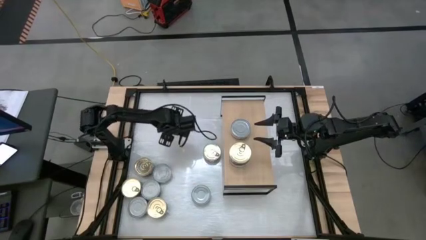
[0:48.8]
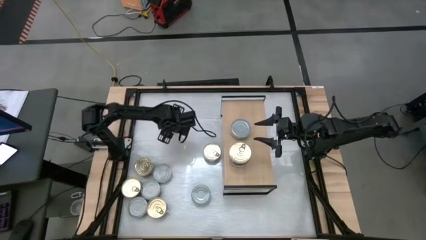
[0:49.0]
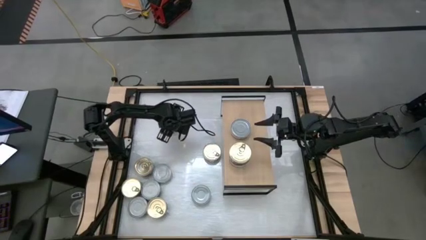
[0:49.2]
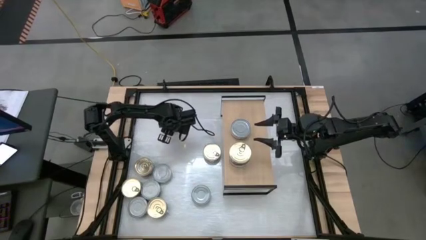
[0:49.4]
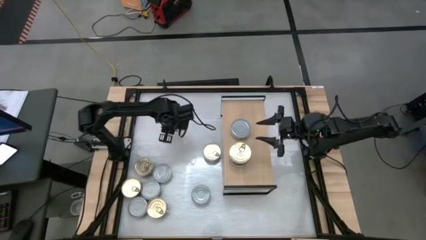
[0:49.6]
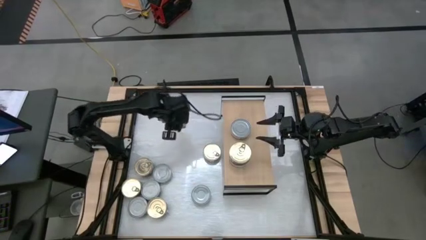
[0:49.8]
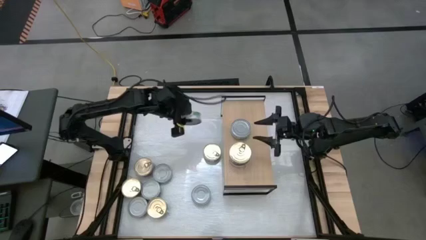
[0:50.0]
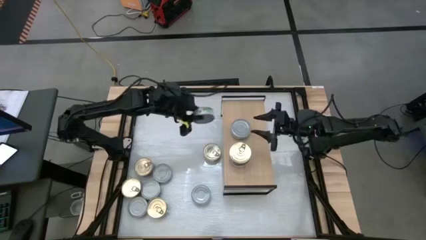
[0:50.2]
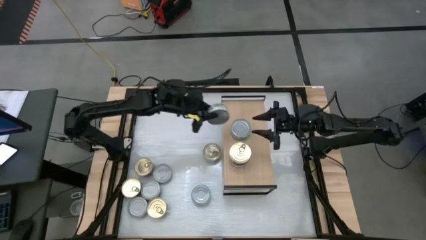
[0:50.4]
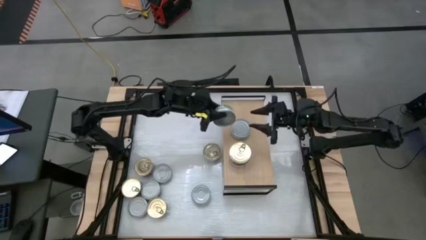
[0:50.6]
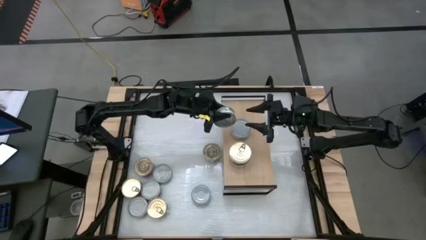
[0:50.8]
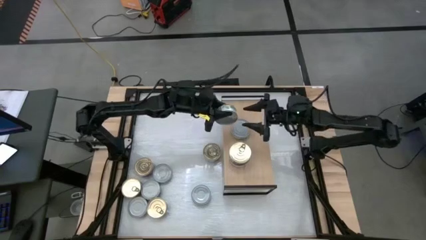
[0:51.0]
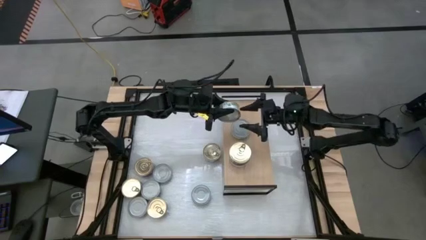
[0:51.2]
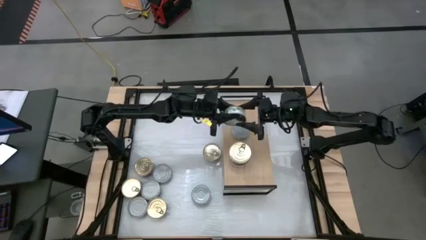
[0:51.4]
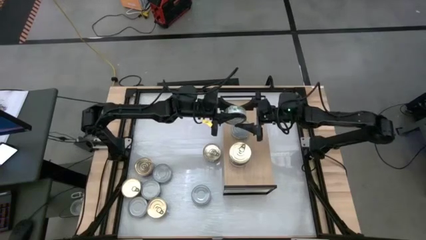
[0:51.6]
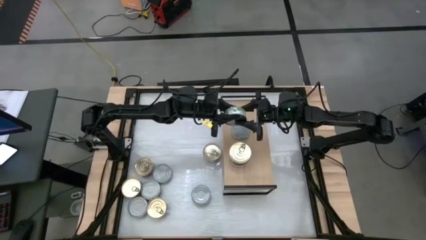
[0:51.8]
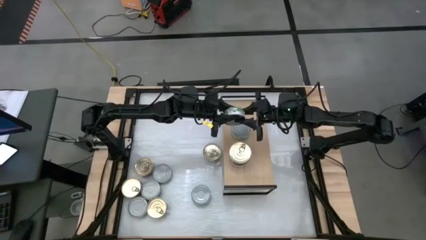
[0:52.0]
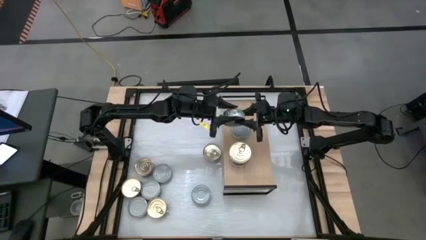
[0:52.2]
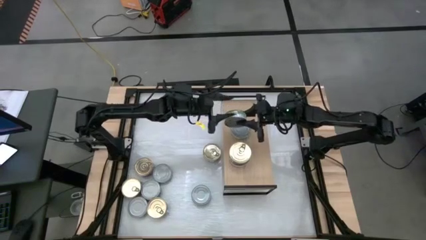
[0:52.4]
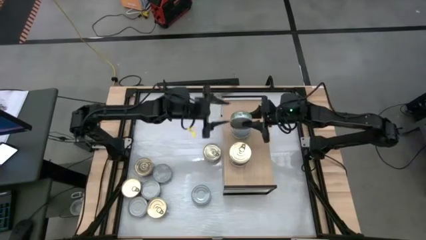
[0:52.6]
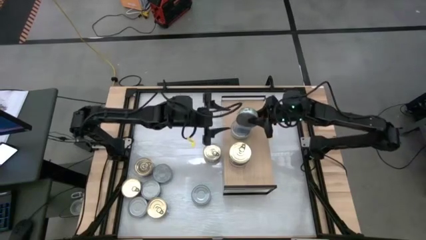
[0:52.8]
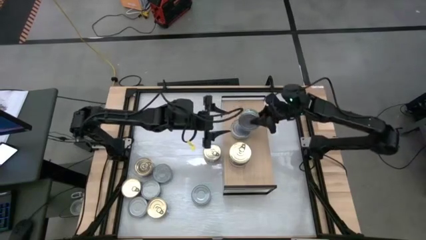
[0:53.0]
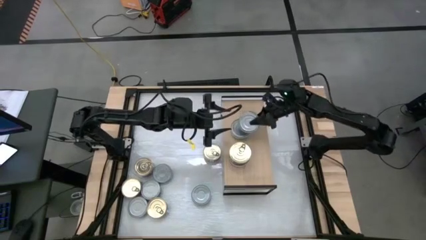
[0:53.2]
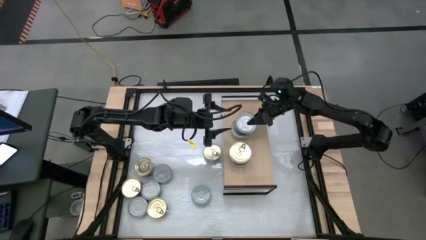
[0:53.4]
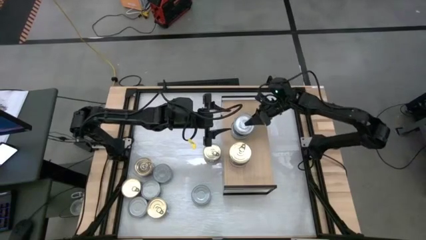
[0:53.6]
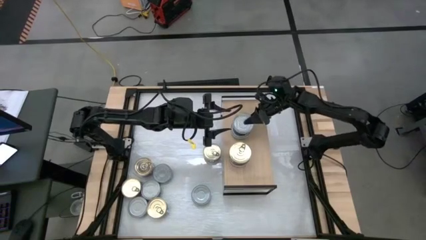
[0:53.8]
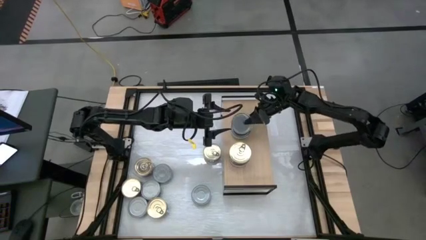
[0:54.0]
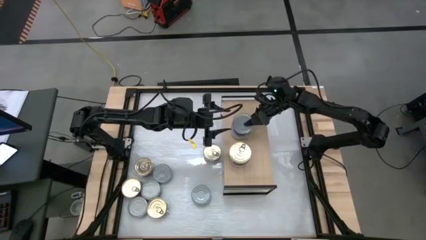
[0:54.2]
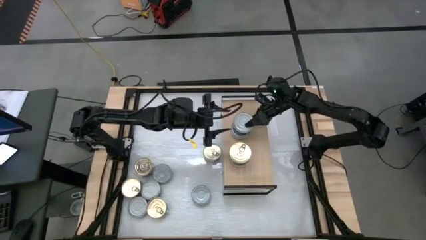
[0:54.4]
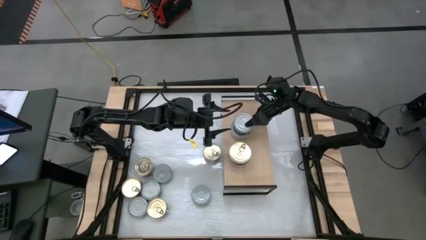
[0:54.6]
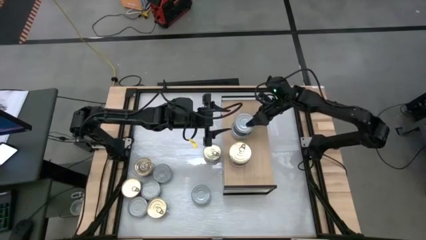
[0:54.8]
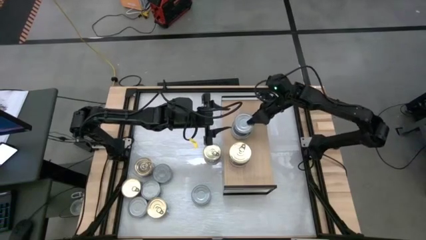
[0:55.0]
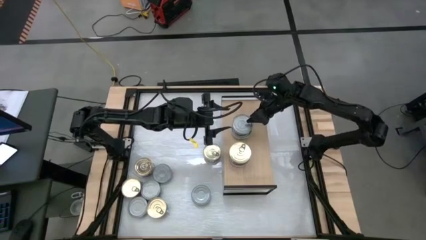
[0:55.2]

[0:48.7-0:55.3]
Task: Stack canned seafood by type on shelf
Stack the green tuna can on top of the green tuna can

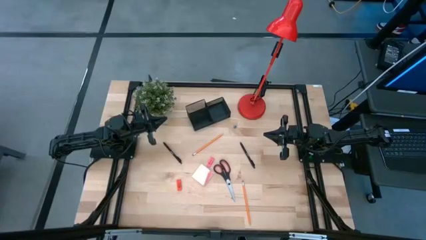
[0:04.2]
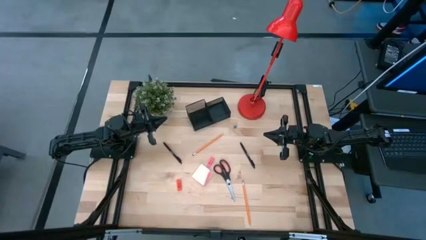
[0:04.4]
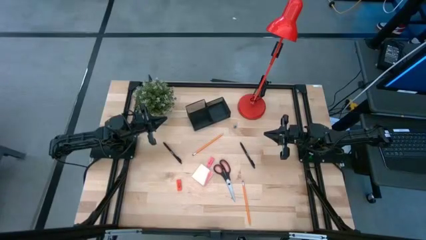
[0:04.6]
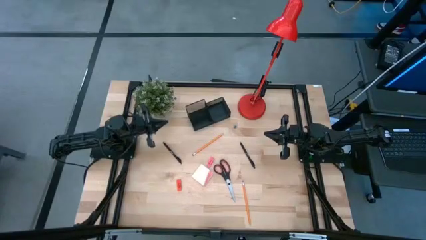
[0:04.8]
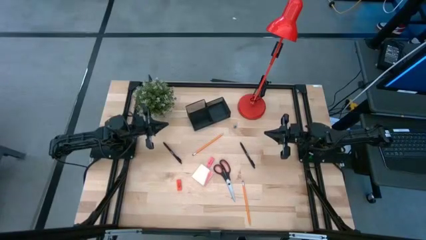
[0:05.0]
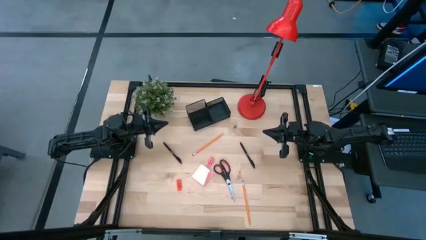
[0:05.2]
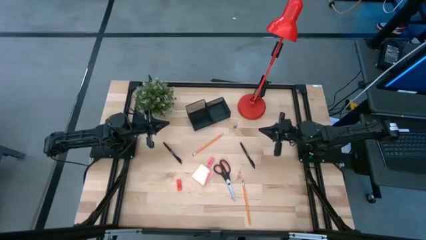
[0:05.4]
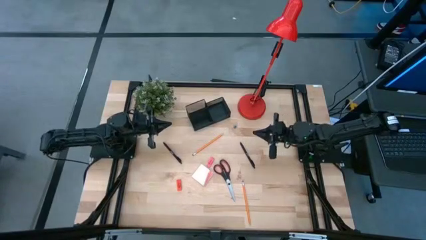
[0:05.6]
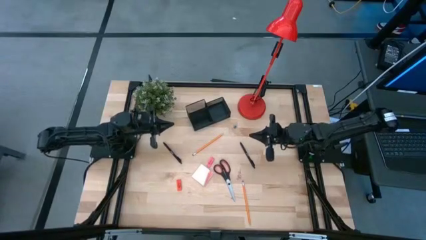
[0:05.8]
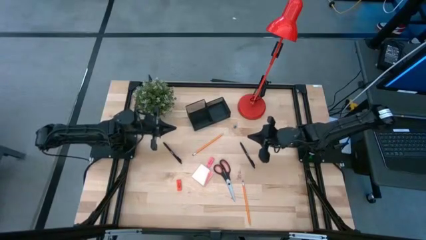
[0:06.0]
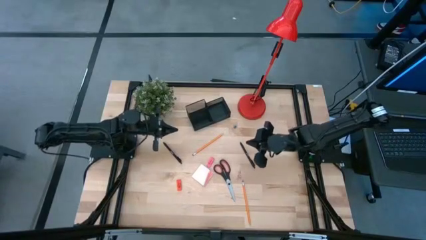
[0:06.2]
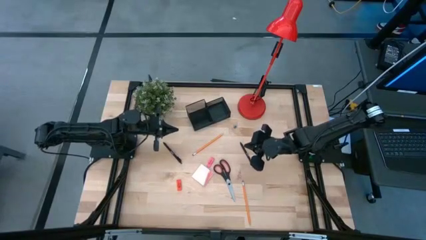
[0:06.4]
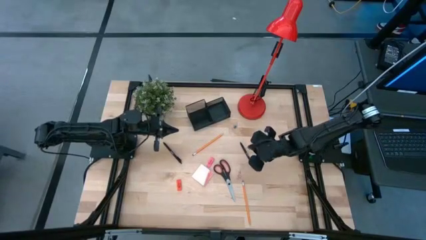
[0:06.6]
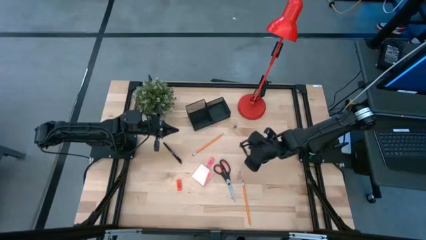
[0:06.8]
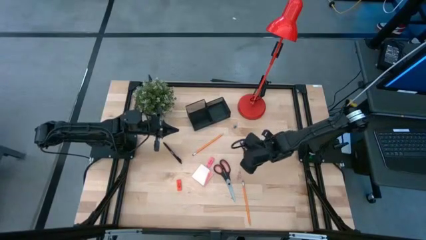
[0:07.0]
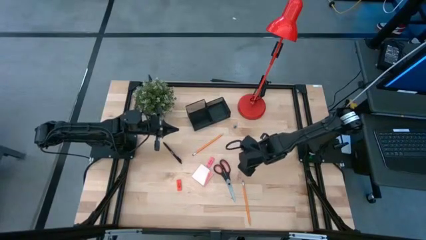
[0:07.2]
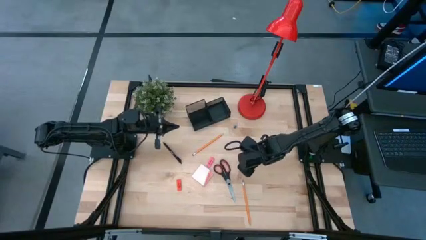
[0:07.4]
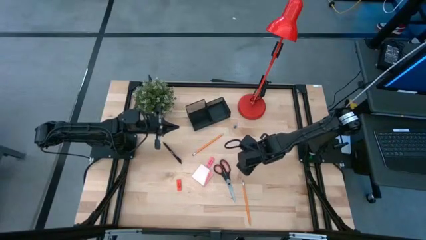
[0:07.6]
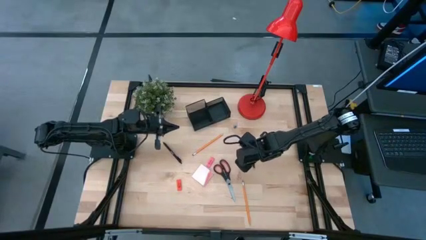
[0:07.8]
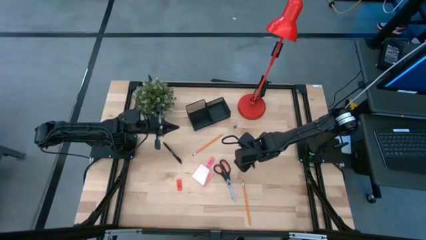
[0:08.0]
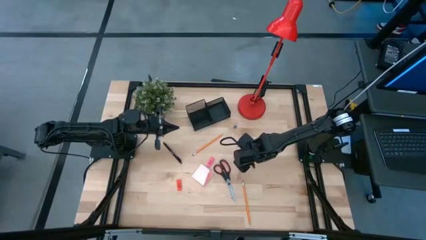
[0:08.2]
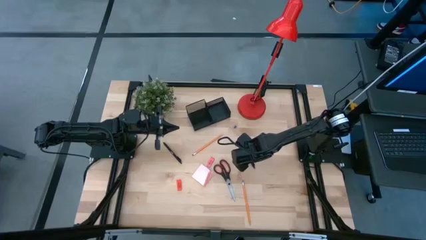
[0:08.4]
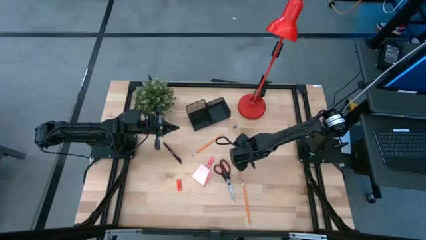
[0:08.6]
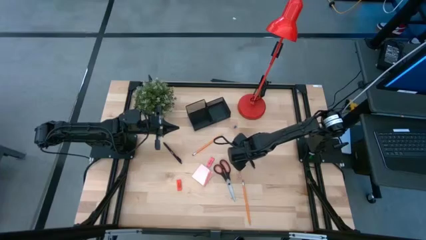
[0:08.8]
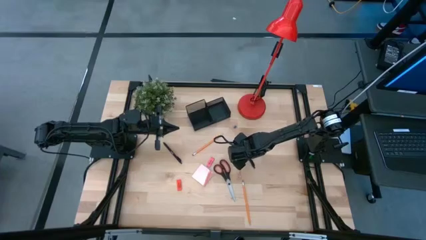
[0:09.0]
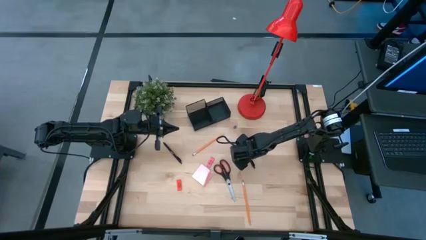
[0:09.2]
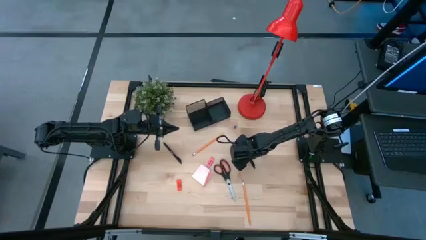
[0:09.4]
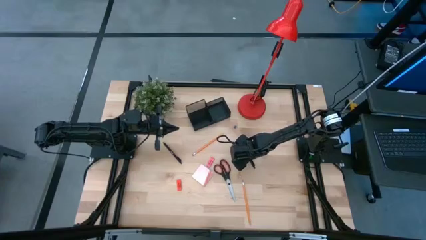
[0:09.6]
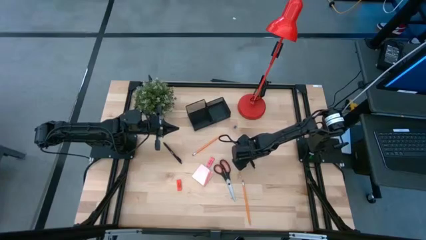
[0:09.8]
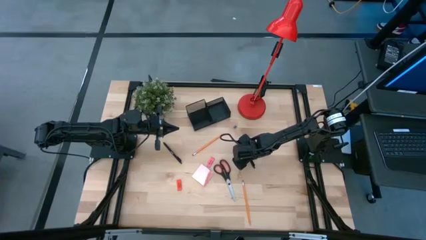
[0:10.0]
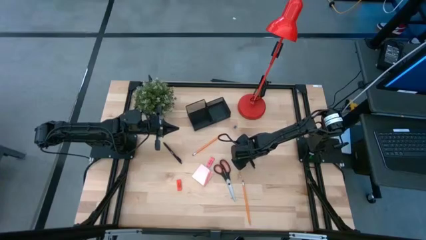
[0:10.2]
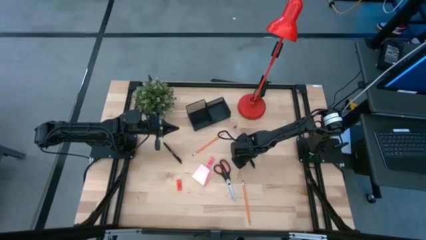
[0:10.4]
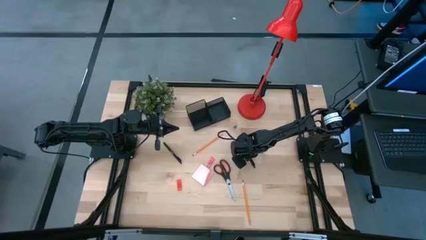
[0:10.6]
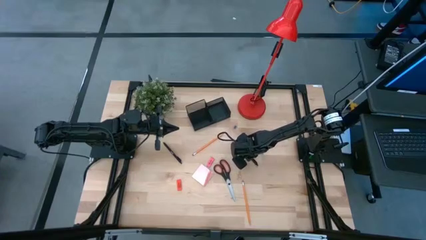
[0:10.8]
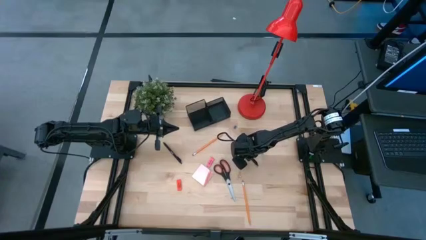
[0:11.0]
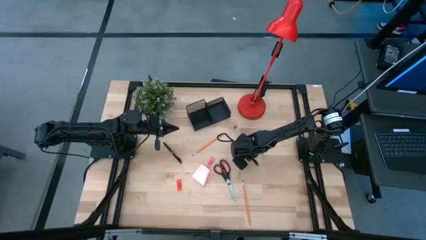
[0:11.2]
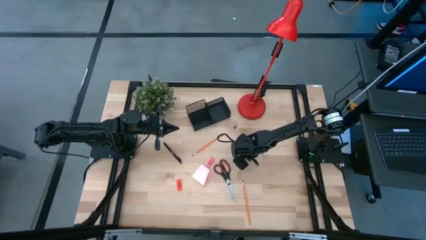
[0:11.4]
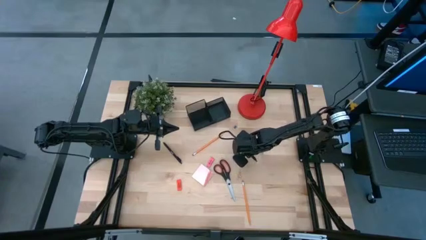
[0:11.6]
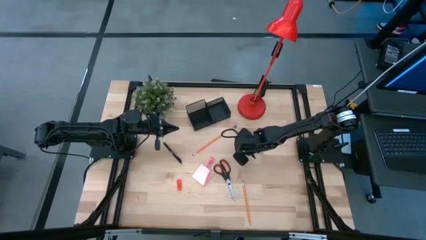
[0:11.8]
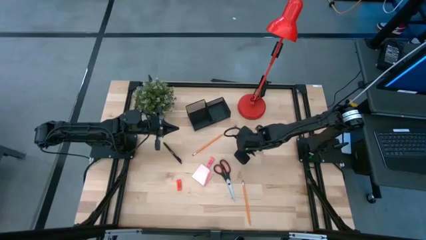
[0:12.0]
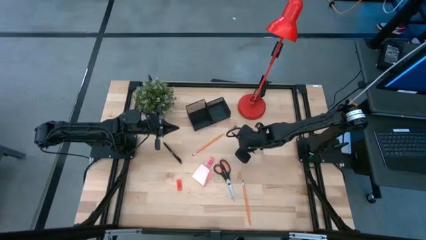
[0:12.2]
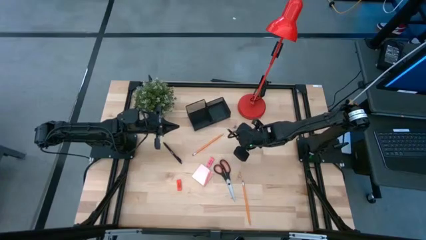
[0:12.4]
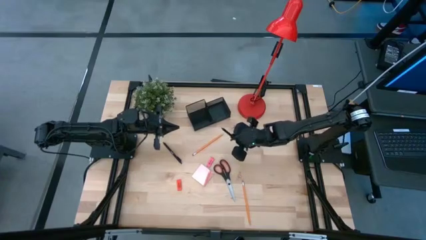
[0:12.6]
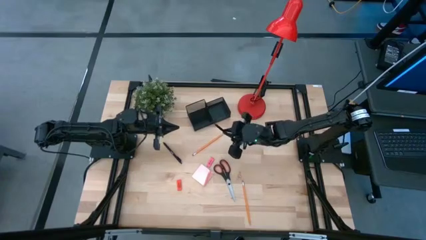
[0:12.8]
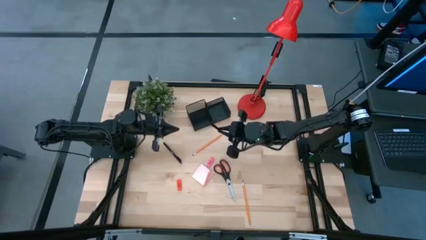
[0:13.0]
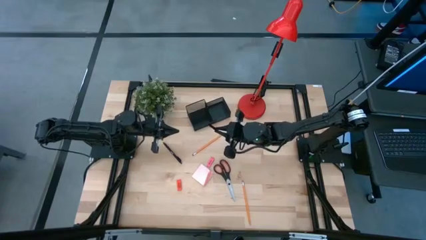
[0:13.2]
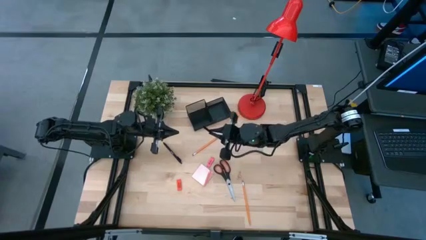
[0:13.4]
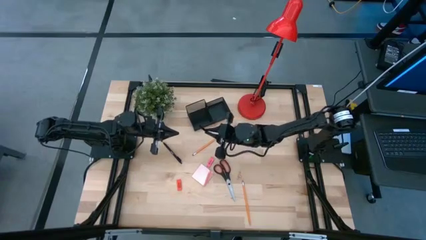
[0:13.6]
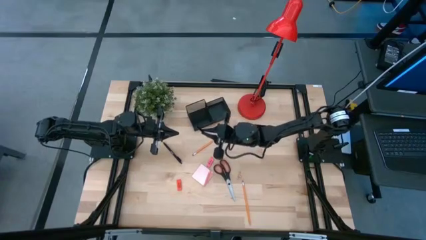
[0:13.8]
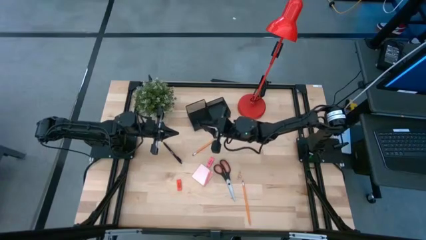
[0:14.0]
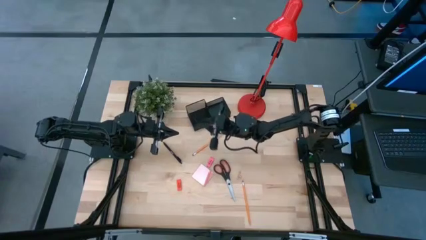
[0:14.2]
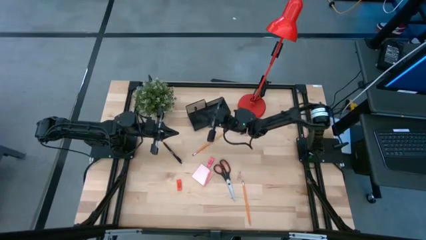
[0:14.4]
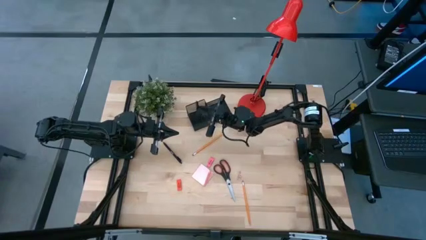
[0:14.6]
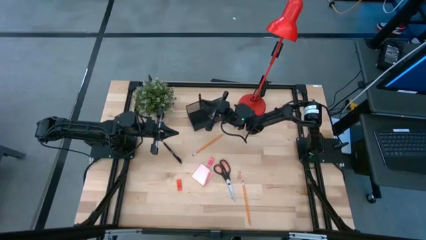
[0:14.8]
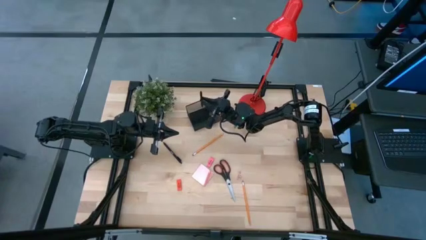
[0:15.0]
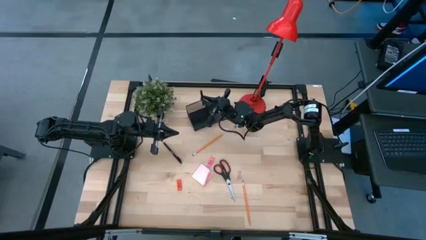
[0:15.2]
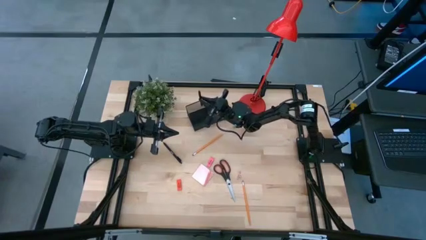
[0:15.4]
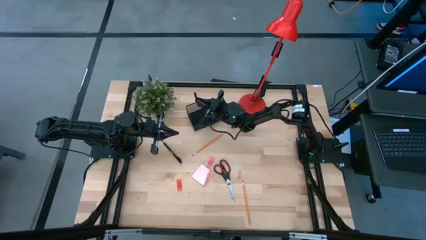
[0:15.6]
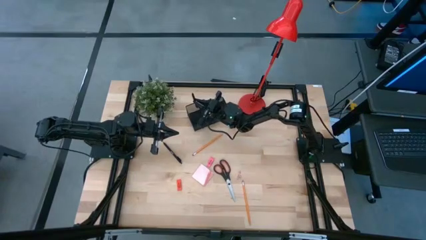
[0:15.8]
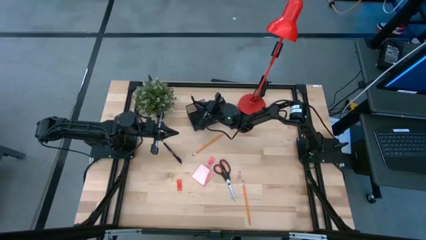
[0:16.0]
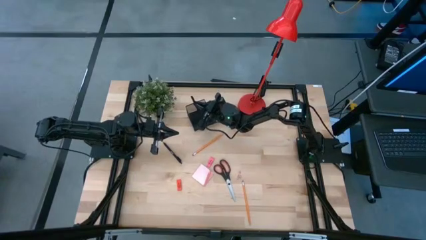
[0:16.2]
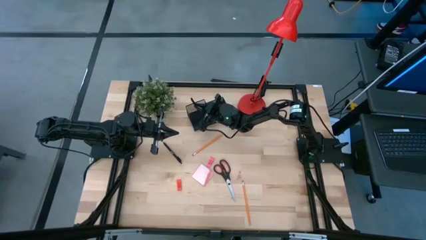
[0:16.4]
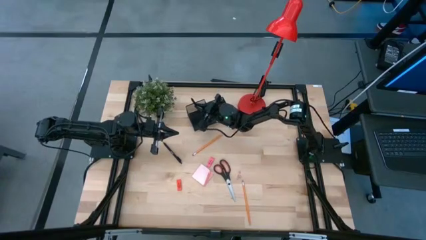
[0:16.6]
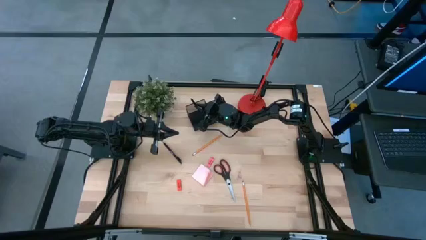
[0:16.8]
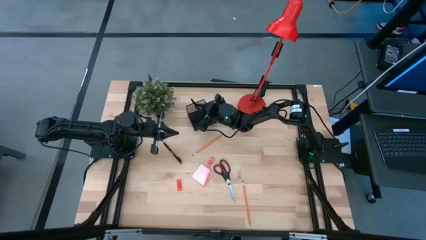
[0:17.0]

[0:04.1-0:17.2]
Task: Pick and place office supplies into organizer
Put the right black pen into the black desk organizer
